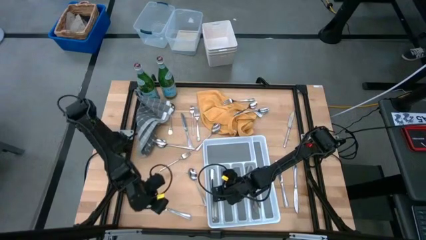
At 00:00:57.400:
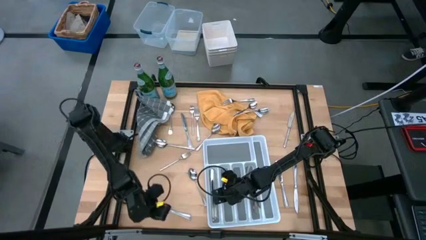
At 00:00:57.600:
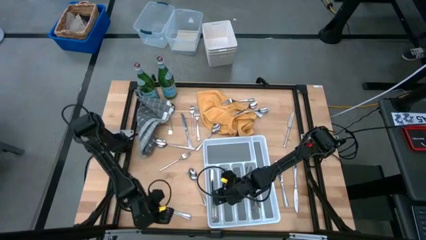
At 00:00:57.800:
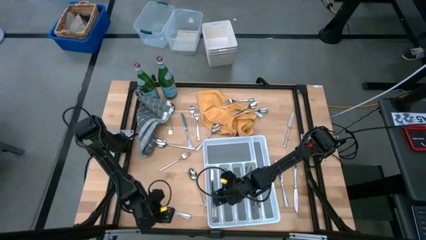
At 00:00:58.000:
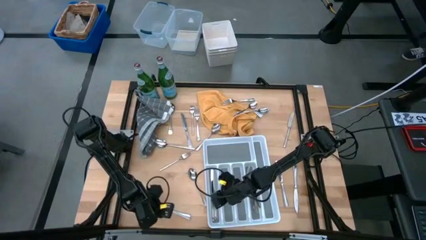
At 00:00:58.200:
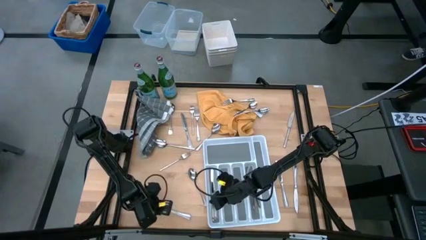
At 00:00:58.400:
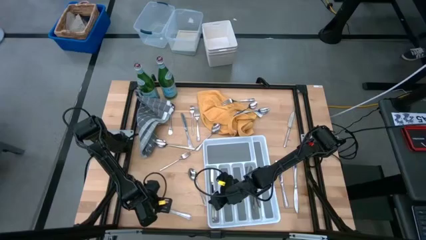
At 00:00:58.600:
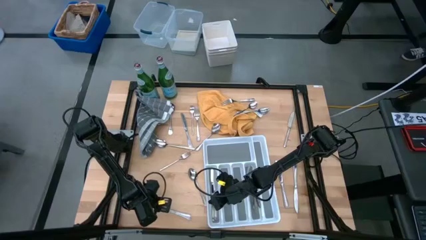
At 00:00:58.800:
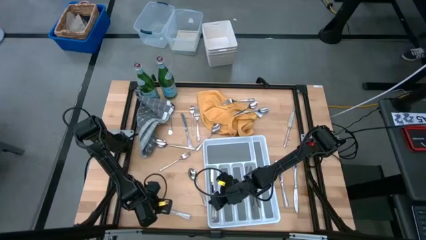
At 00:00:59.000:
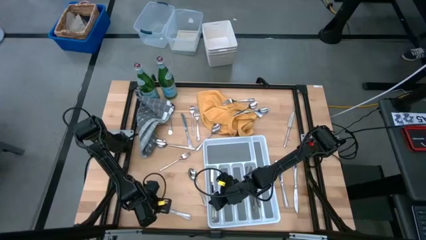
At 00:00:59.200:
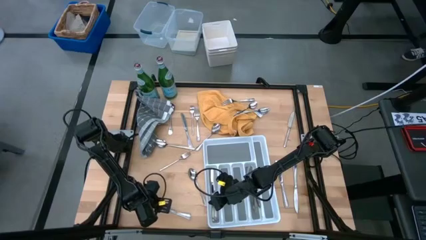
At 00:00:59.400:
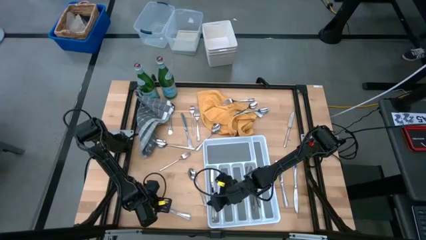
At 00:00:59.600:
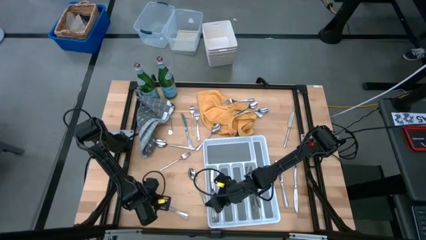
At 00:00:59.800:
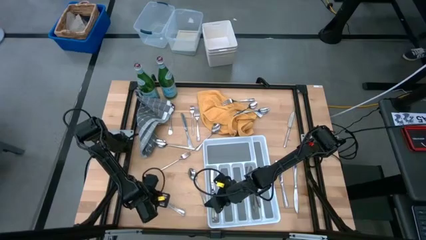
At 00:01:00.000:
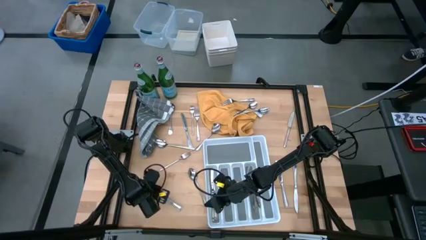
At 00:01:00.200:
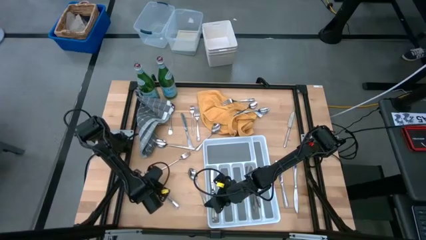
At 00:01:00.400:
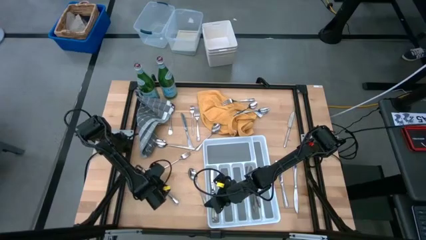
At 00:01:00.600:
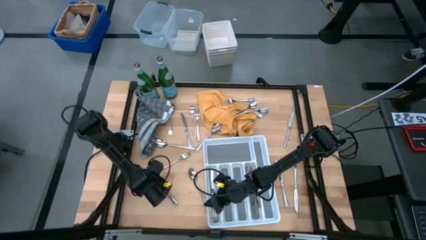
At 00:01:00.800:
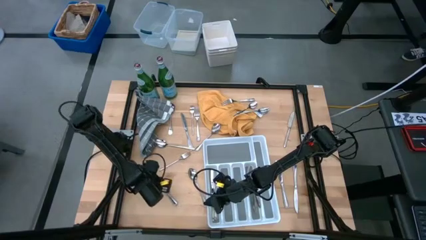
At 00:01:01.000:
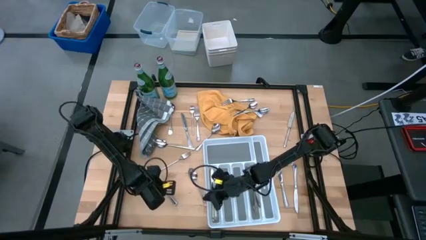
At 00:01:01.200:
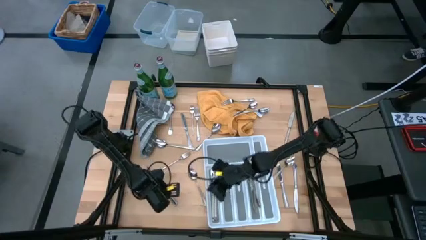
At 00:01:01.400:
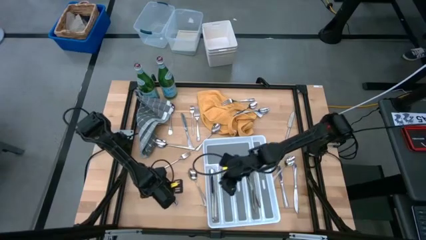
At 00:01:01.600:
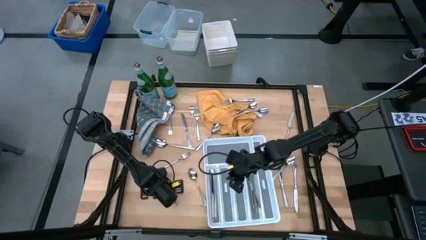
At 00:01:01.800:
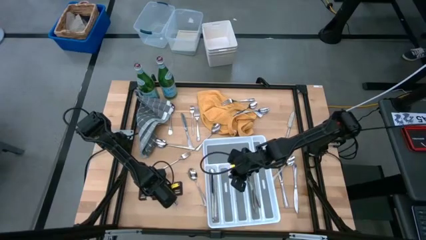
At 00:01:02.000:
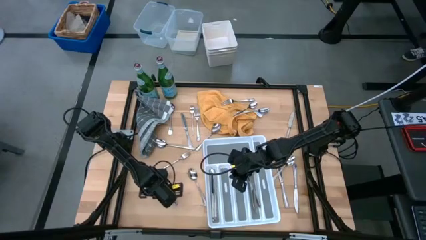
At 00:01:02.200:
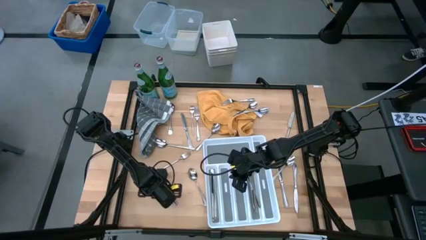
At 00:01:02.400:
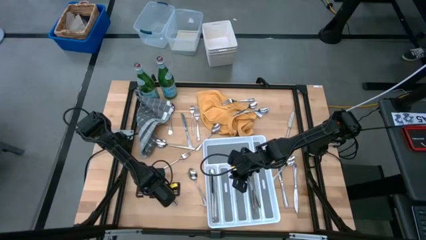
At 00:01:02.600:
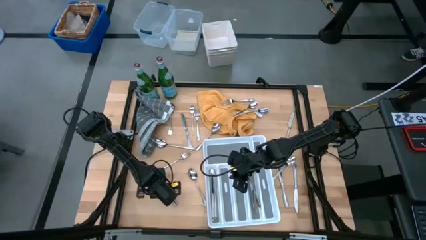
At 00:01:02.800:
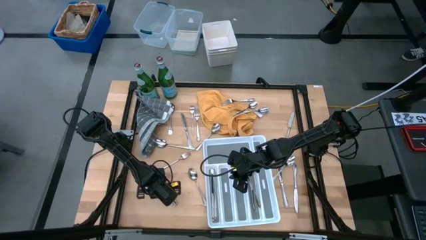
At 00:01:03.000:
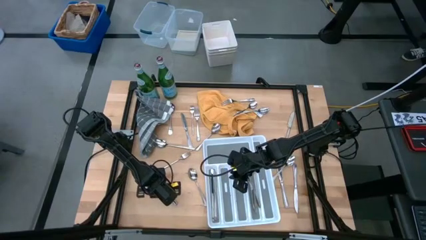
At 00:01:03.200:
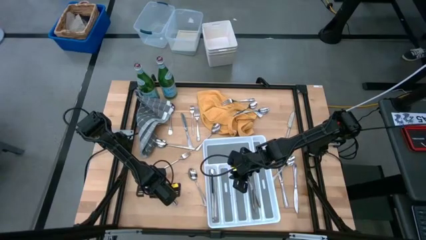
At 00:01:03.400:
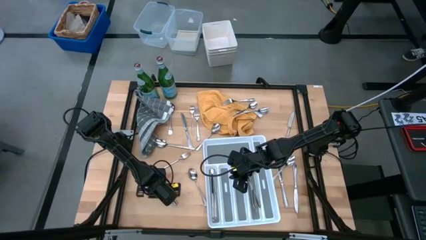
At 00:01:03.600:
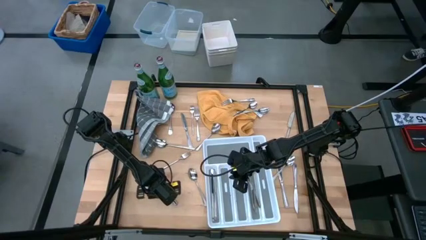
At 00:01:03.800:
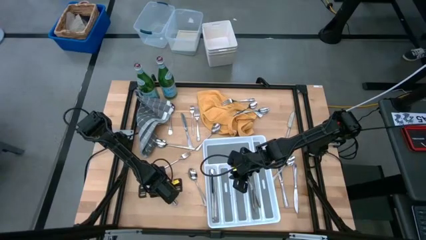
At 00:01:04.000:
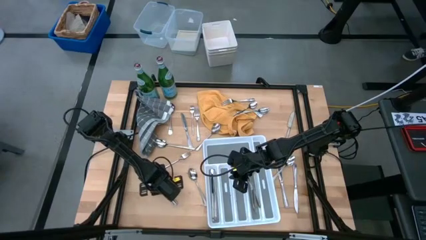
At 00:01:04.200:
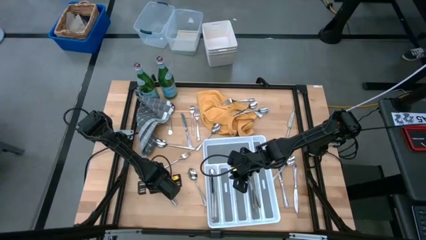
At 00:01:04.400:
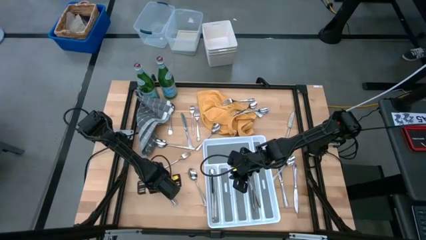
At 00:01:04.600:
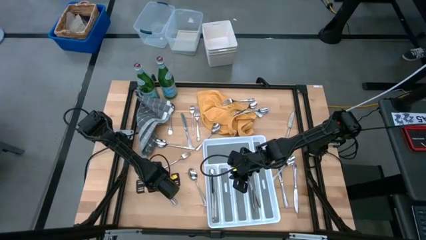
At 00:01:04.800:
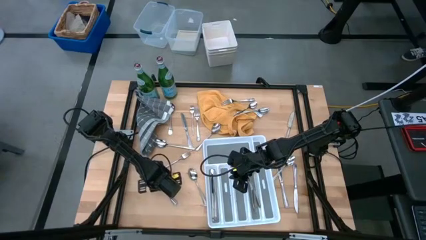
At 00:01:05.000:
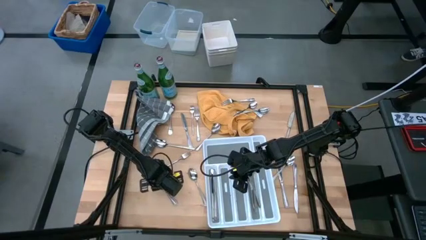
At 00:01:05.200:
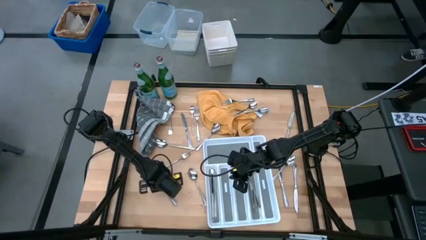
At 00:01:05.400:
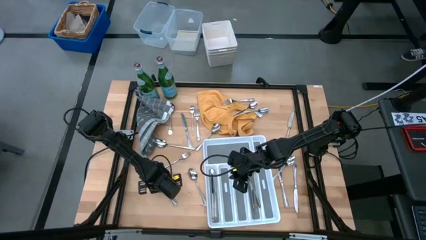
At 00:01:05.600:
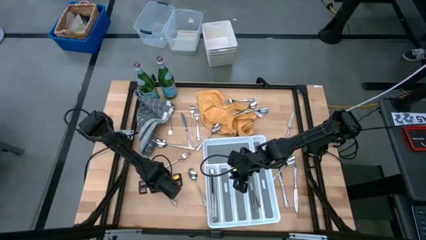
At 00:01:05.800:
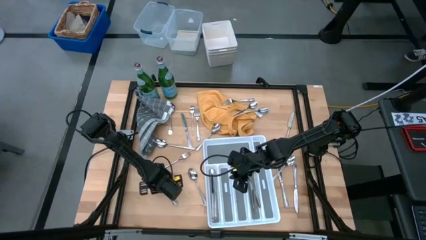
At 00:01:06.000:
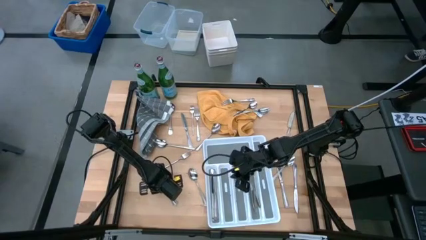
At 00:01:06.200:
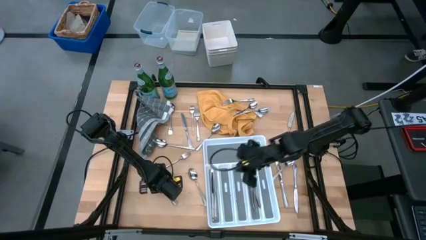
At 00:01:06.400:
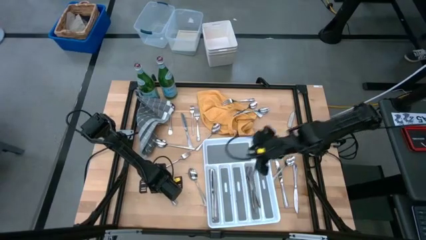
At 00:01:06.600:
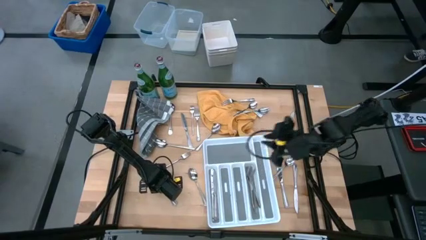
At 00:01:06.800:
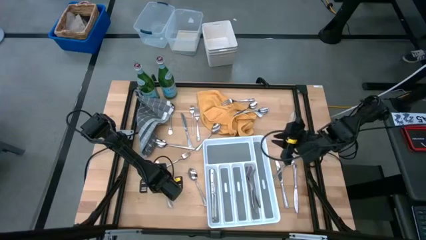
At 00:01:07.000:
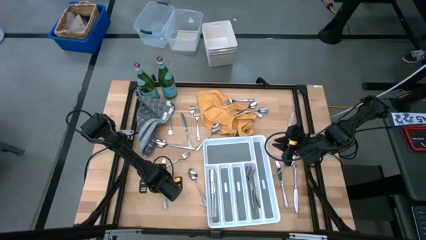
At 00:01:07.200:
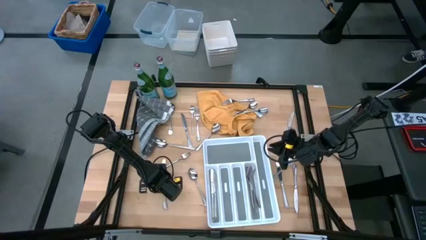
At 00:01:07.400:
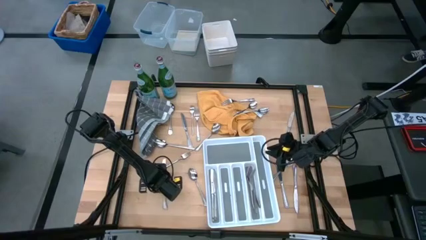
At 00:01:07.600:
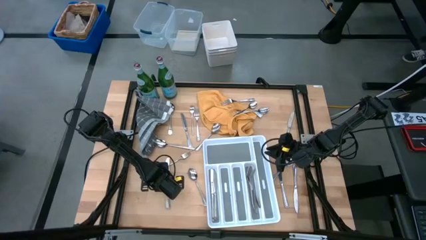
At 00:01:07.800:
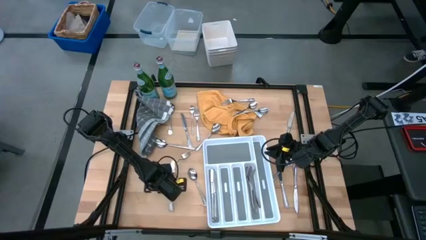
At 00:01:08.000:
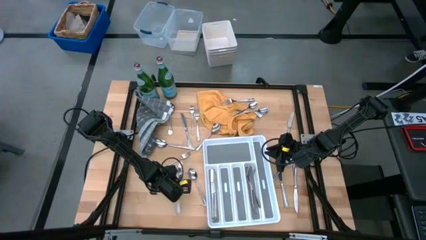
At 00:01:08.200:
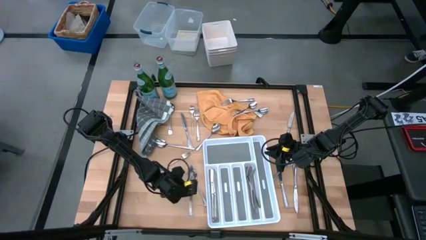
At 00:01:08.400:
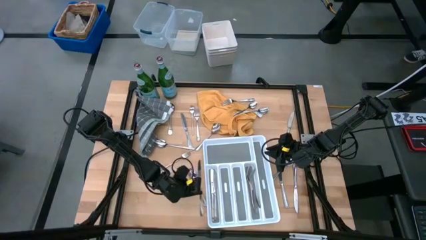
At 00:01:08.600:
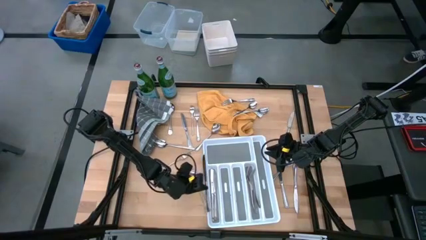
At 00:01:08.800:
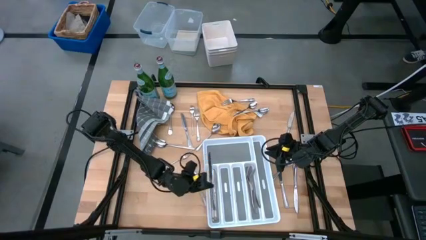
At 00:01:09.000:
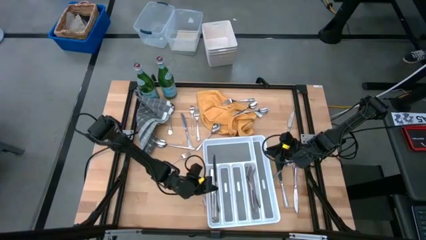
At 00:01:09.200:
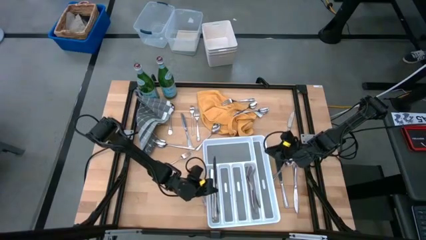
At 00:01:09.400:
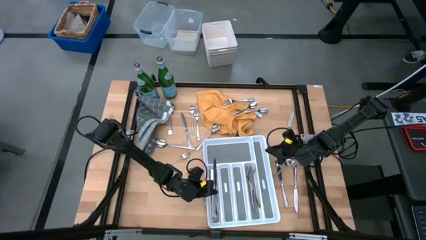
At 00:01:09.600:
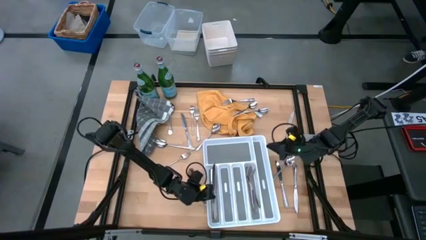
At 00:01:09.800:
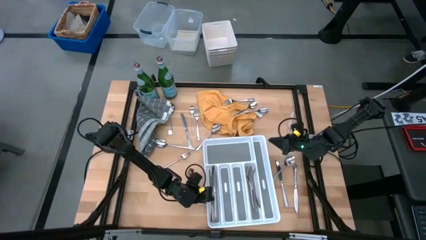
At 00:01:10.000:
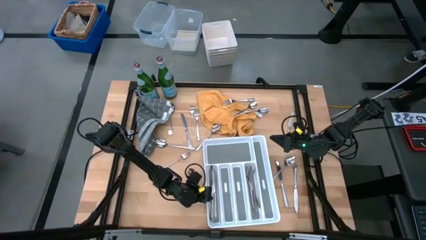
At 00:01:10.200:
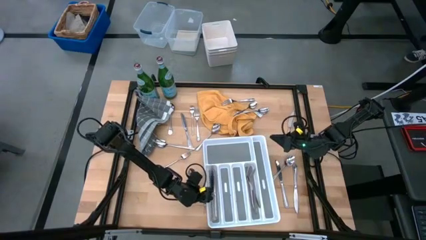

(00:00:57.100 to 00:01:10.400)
Task: Sort silverware
Put the table knife into the silverware tray
